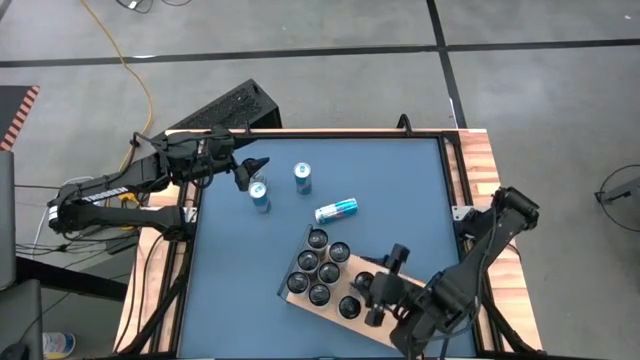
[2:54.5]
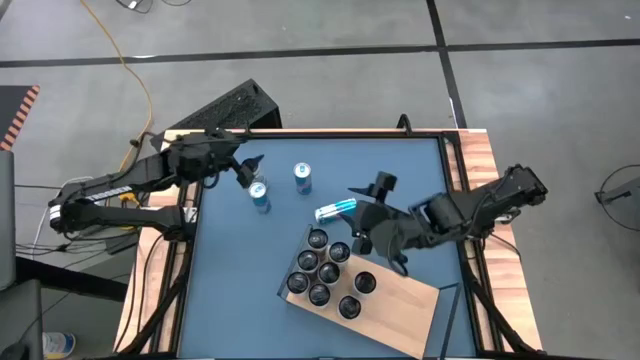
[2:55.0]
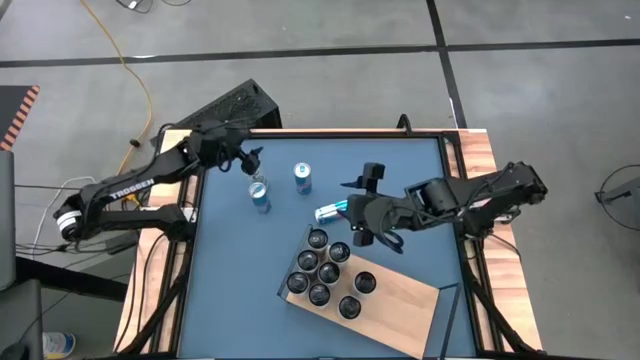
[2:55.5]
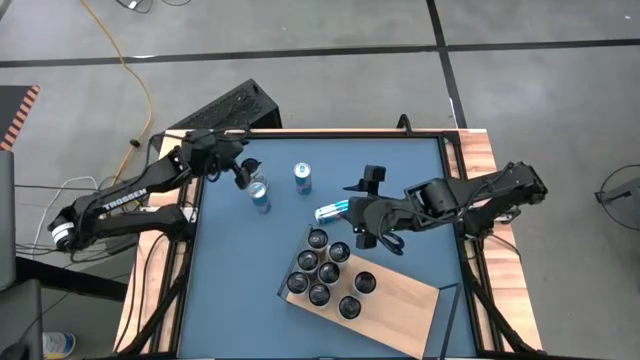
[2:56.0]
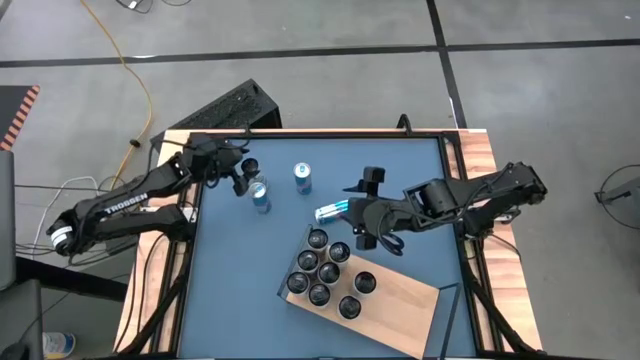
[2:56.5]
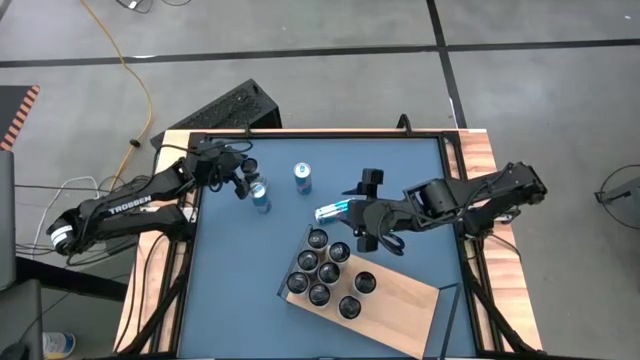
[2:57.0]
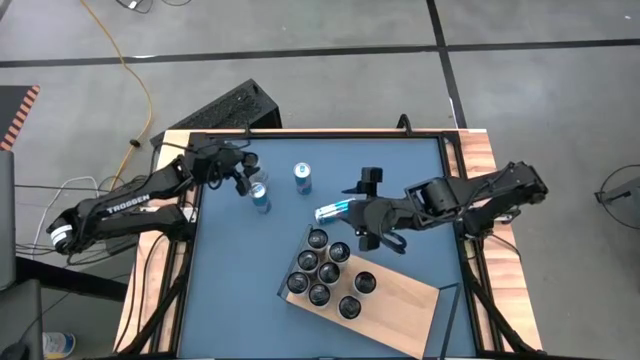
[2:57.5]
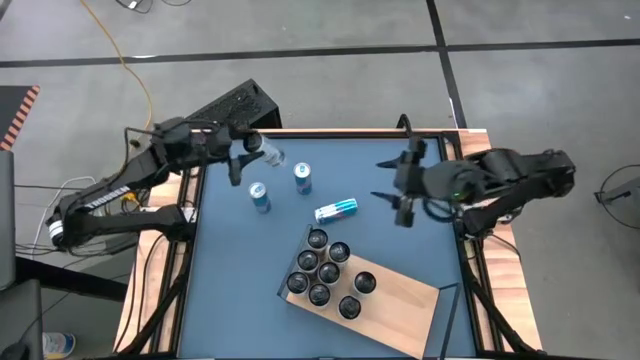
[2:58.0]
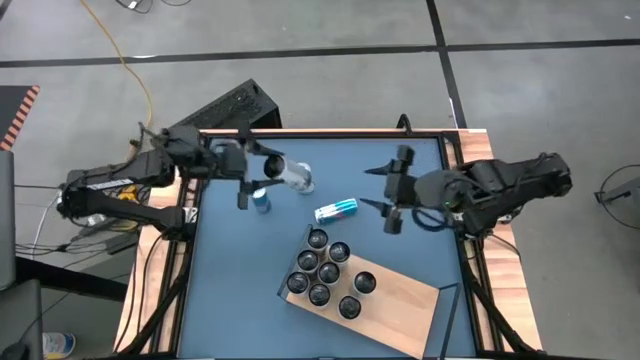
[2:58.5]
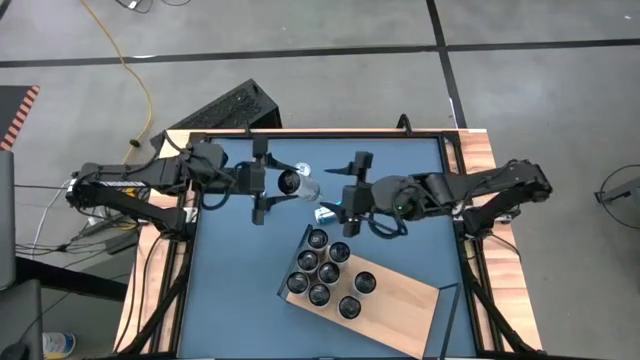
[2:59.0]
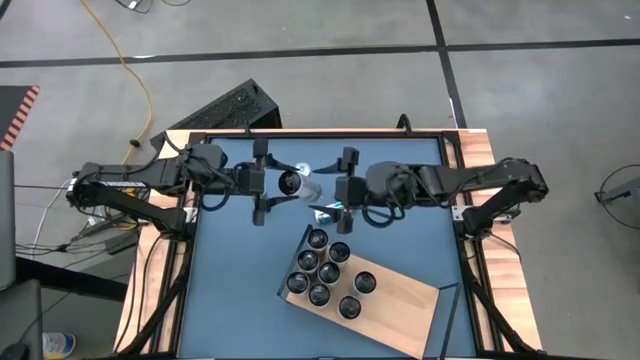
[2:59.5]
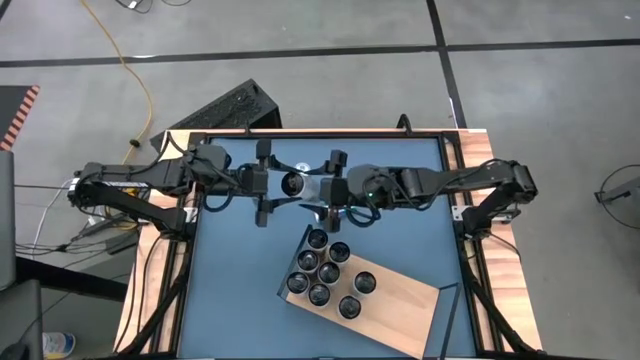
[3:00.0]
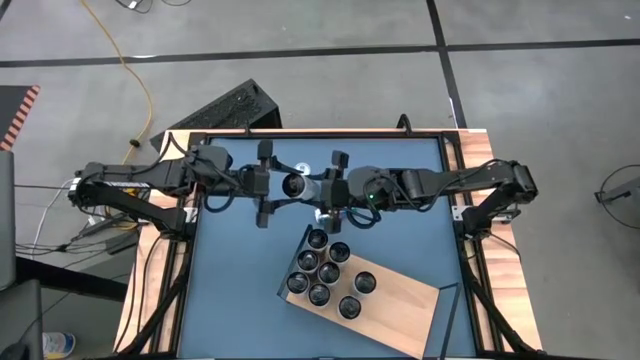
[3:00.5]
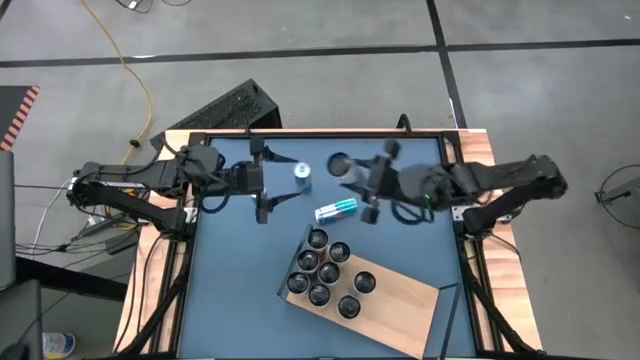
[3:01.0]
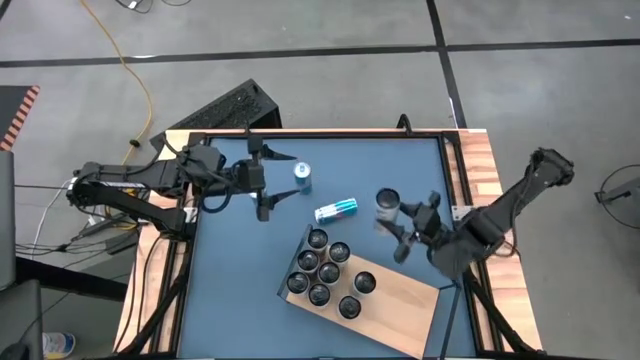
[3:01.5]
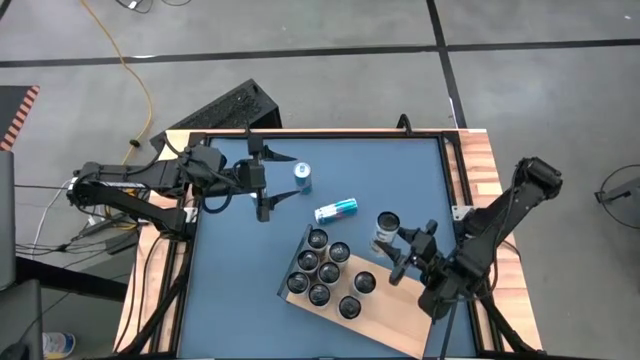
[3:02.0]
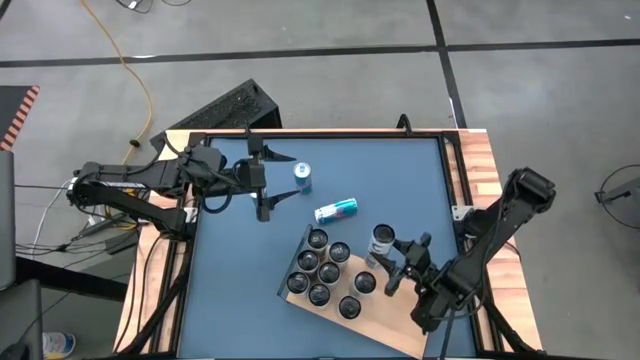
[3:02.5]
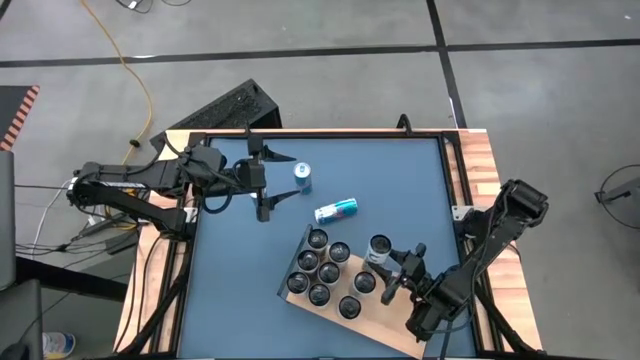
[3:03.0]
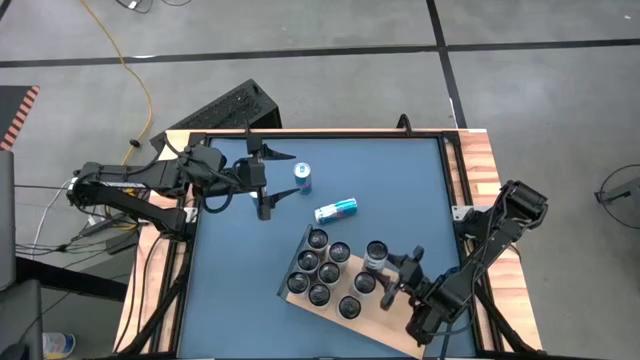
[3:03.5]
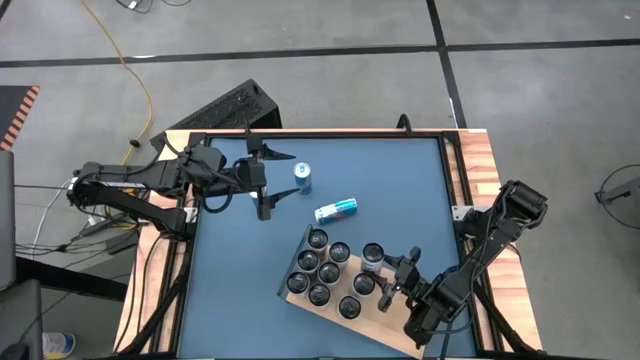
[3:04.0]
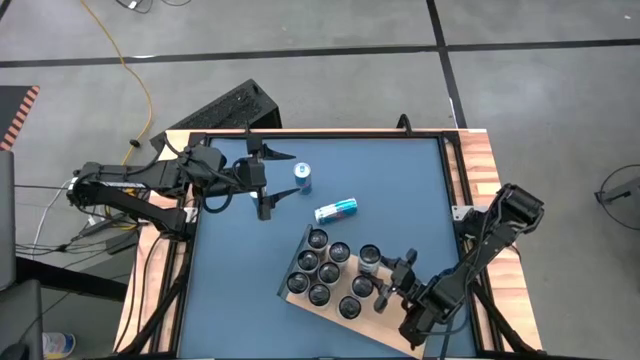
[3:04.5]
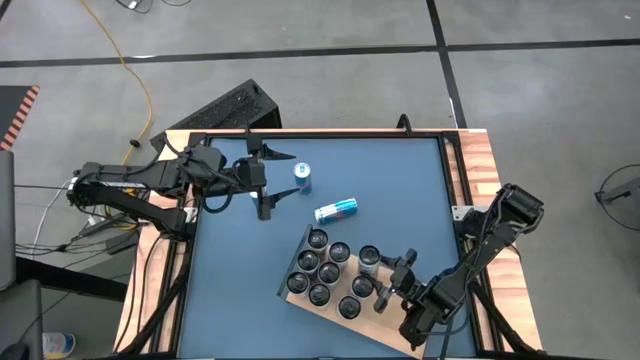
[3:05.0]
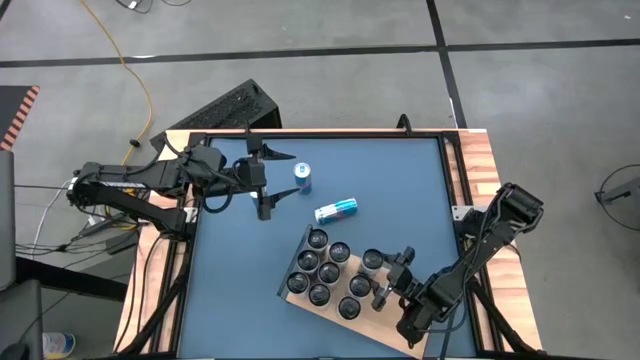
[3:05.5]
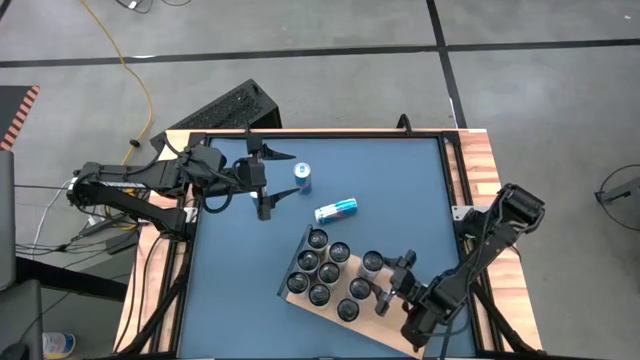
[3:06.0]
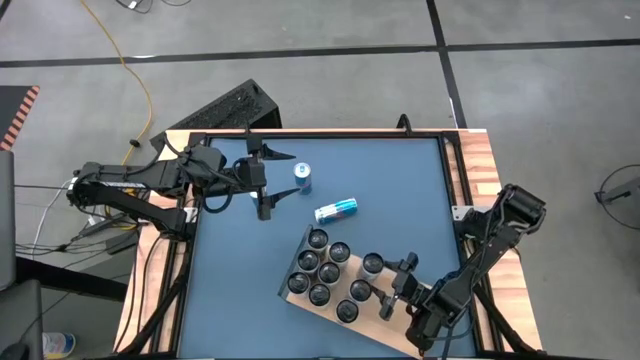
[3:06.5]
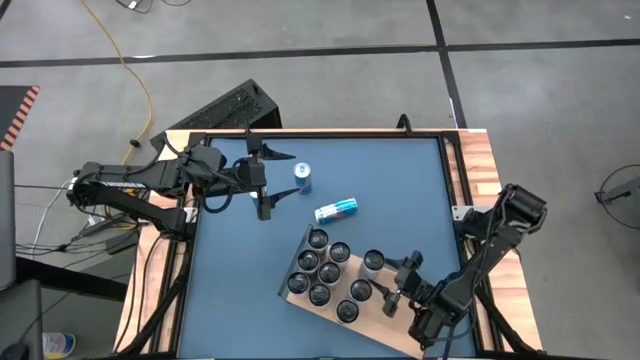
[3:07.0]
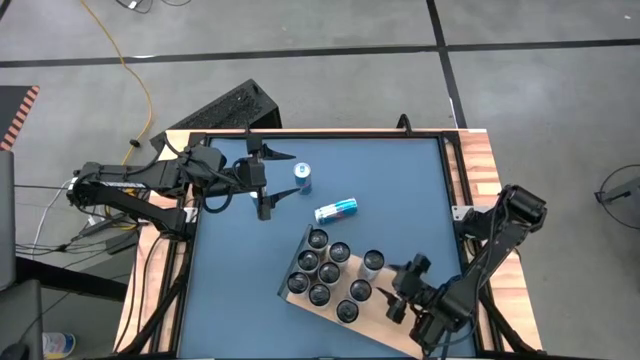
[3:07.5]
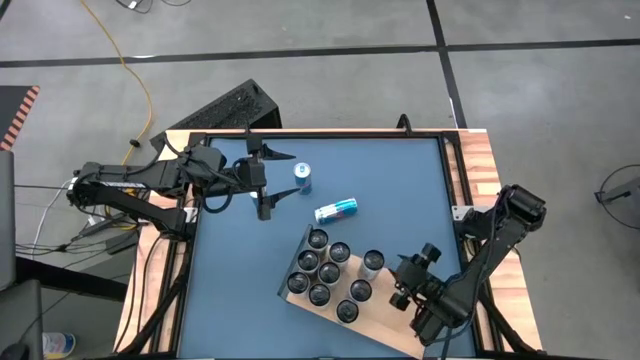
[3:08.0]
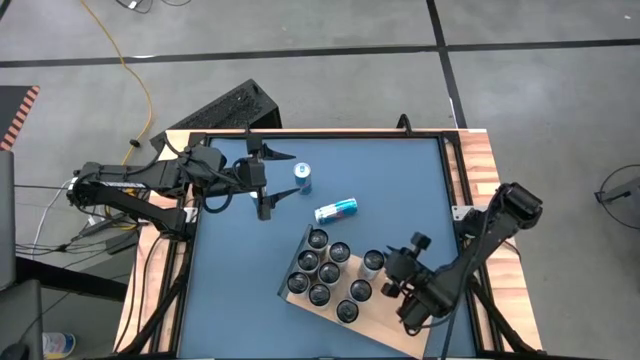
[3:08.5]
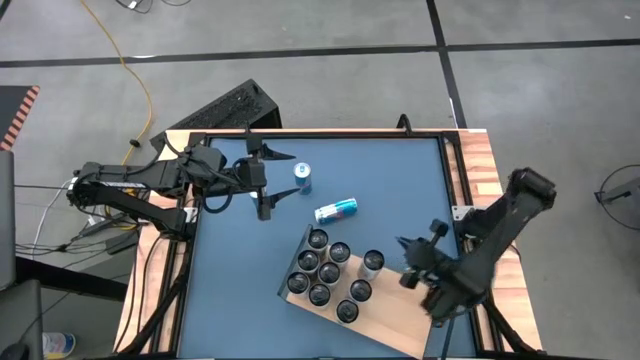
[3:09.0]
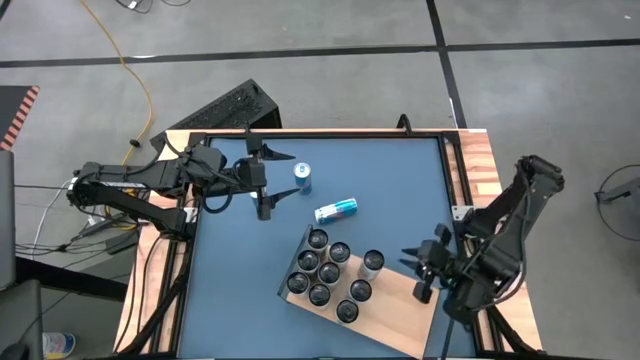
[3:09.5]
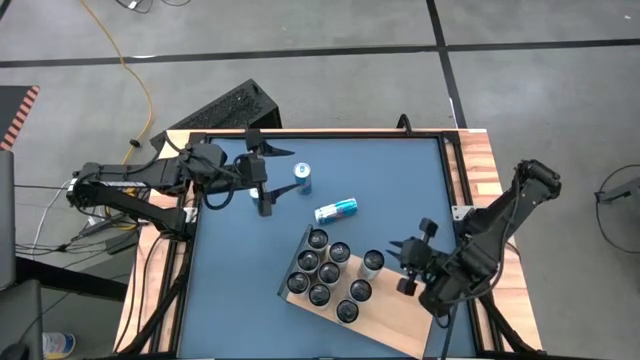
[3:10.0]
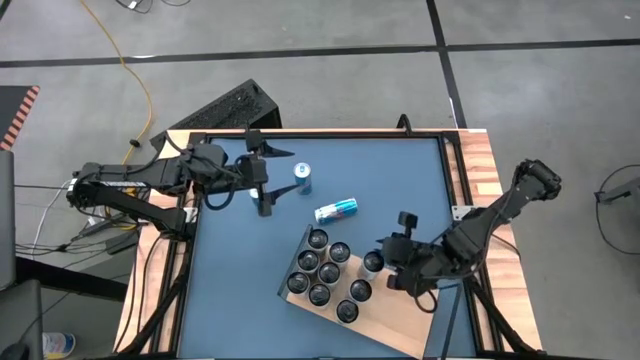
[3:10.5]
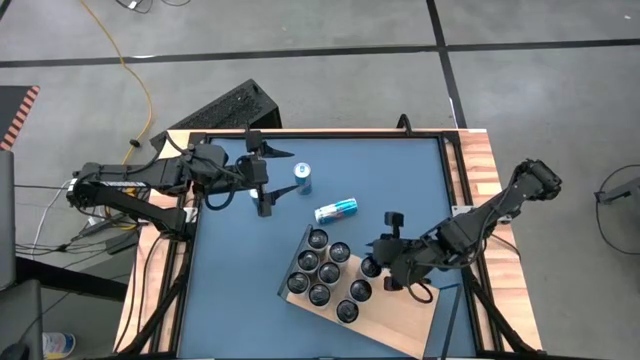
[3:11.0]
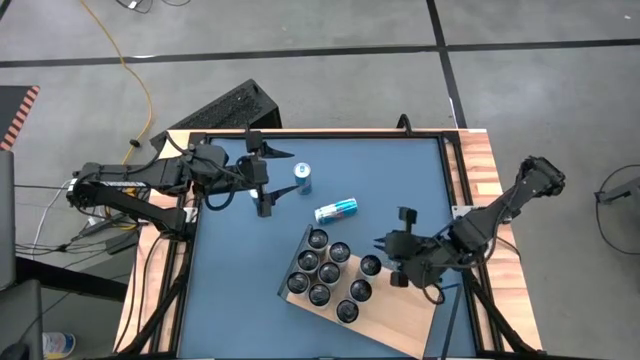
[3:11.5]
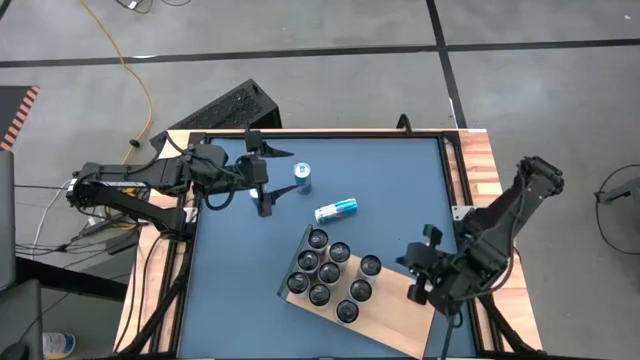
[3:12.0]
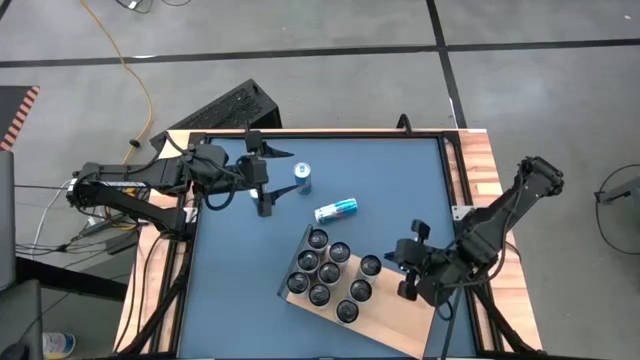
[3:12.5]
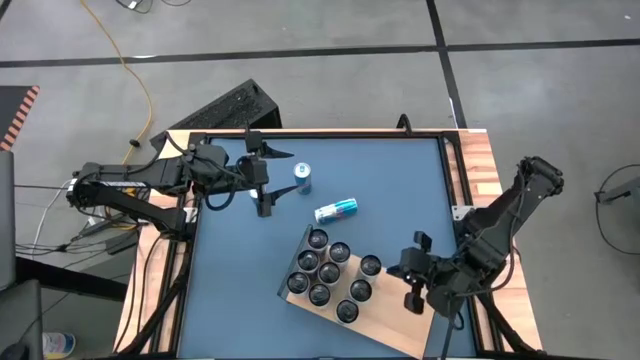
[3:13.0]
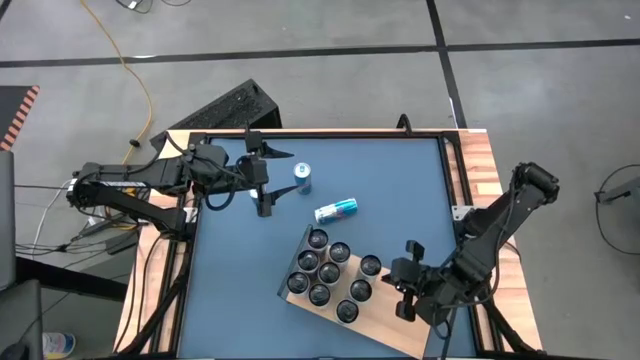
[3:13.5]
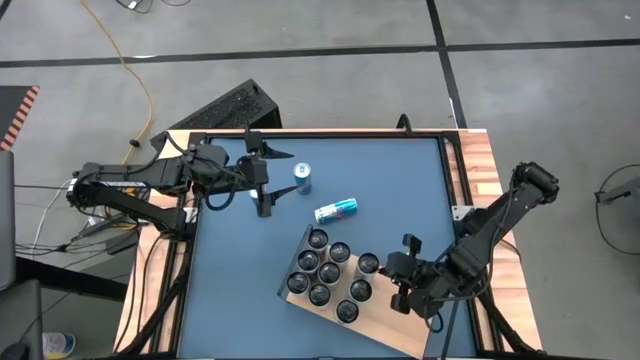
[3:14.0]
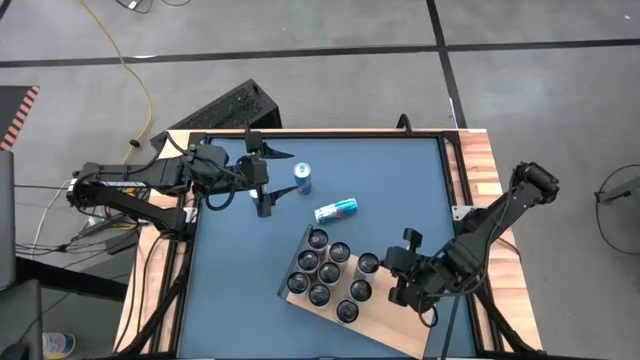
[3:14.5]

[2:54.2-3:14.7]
Task: Place canned beverage on shelf
Put the top white blue soda can aligned with the other white blue soda can on the shelf

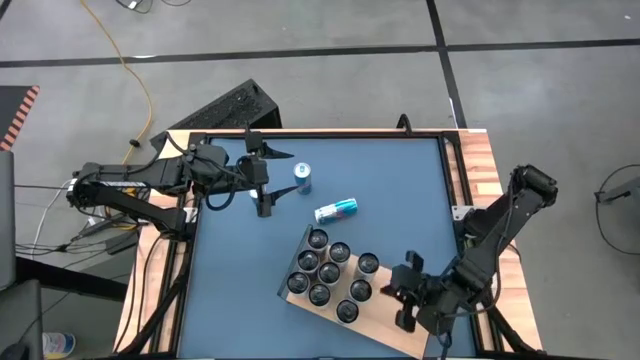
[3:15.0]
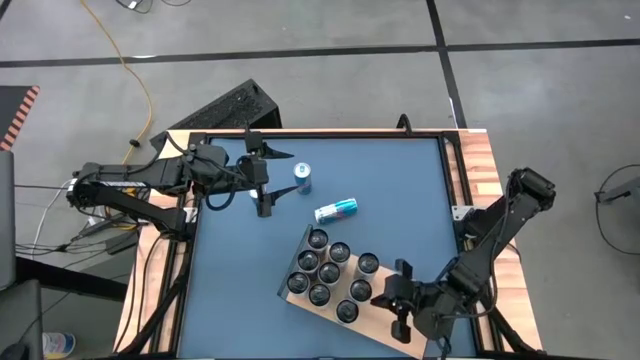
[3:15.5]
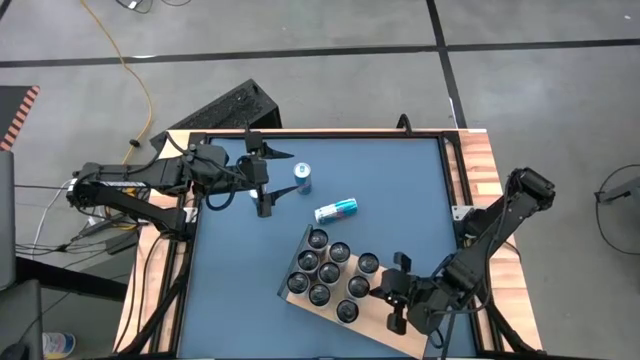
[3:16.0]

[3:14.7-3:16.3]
Adjust the white blue soda can on the shelf
